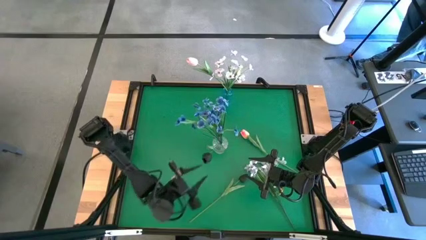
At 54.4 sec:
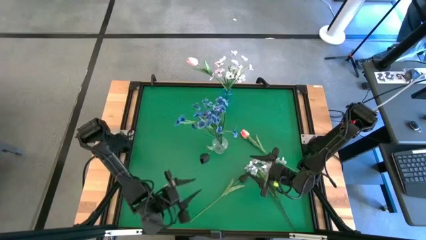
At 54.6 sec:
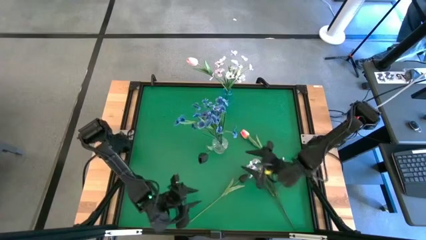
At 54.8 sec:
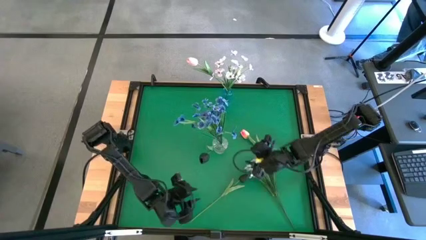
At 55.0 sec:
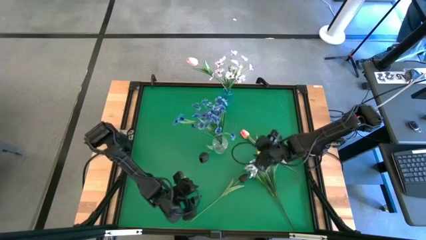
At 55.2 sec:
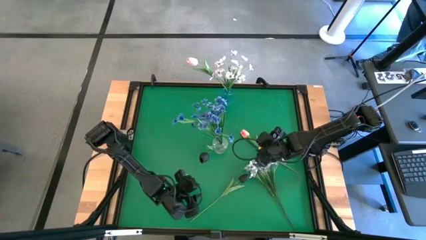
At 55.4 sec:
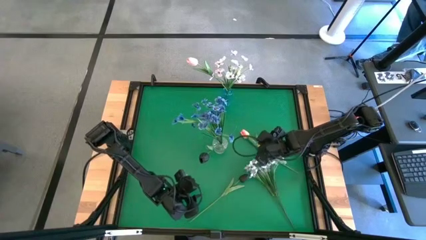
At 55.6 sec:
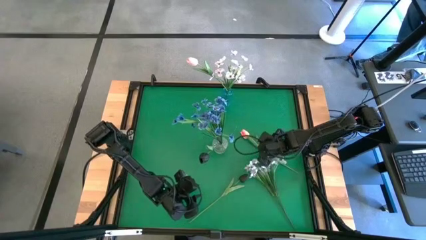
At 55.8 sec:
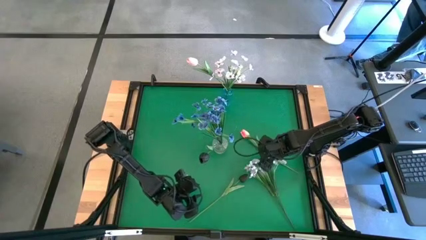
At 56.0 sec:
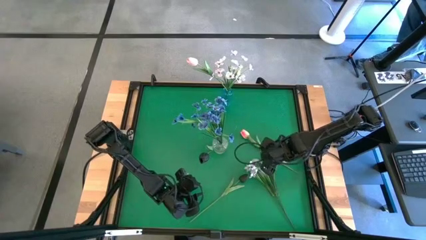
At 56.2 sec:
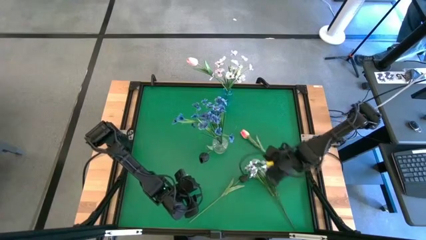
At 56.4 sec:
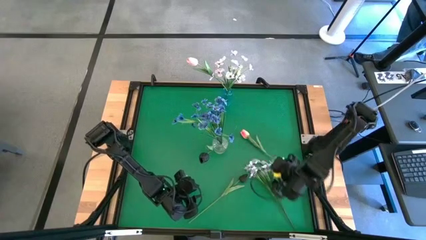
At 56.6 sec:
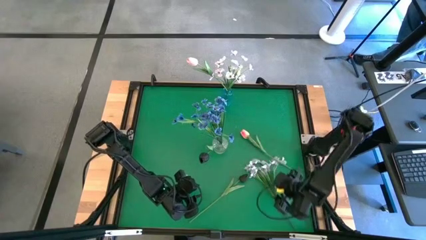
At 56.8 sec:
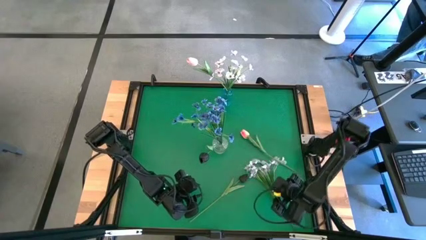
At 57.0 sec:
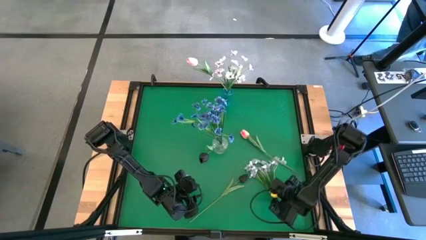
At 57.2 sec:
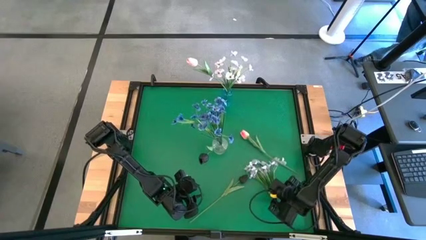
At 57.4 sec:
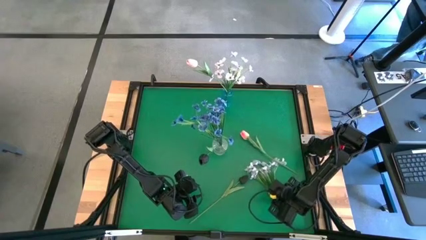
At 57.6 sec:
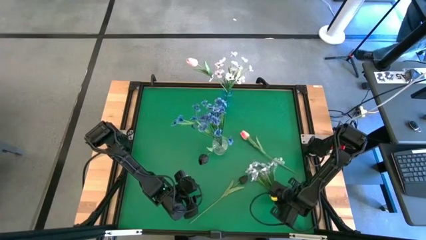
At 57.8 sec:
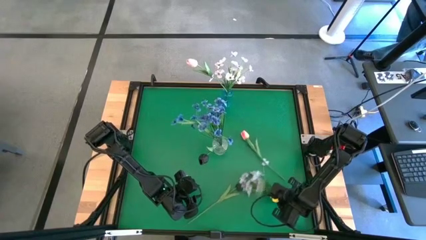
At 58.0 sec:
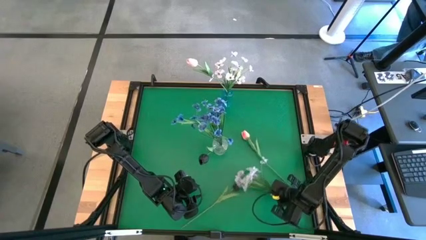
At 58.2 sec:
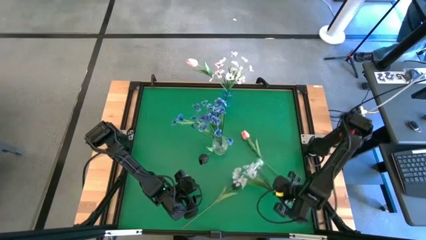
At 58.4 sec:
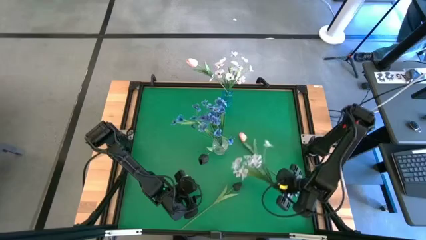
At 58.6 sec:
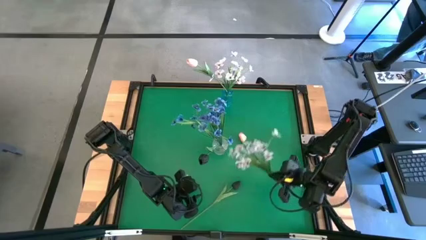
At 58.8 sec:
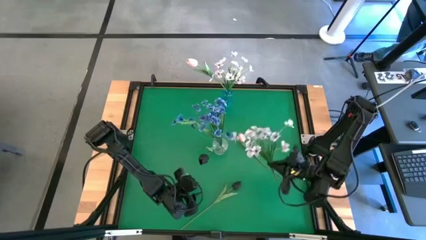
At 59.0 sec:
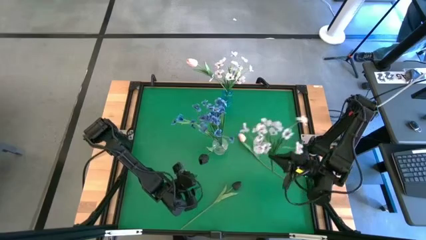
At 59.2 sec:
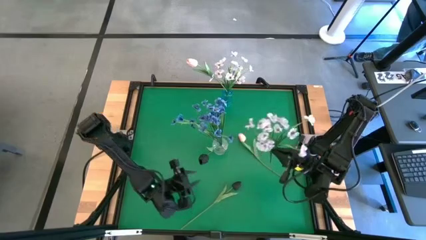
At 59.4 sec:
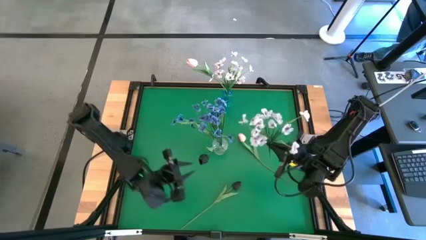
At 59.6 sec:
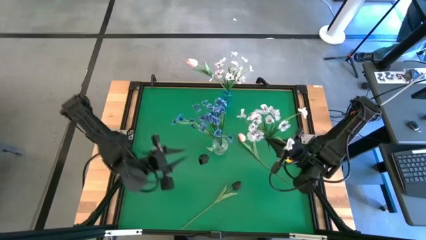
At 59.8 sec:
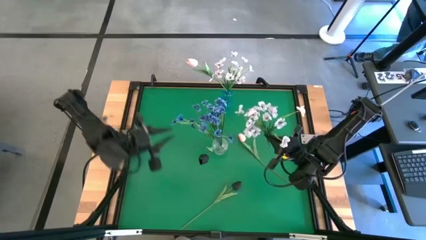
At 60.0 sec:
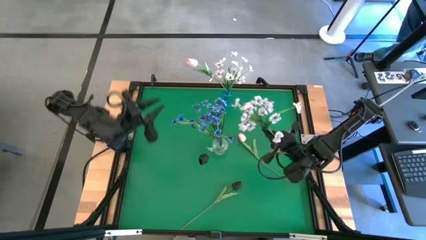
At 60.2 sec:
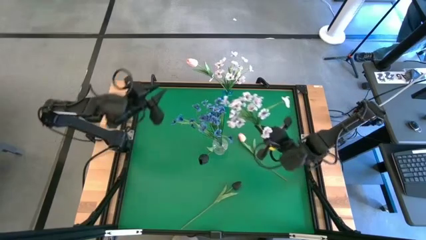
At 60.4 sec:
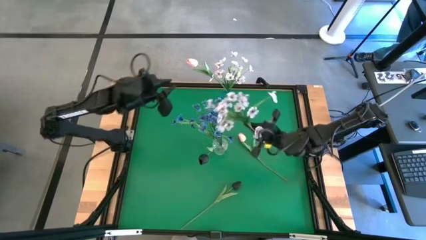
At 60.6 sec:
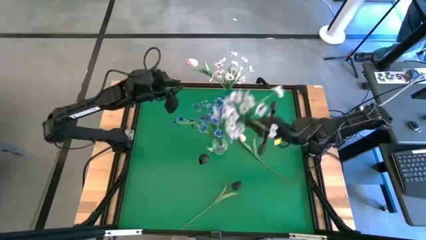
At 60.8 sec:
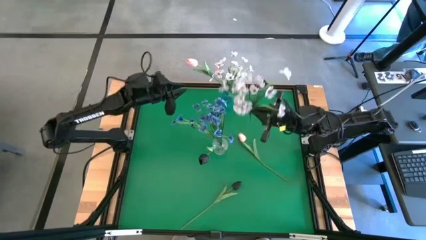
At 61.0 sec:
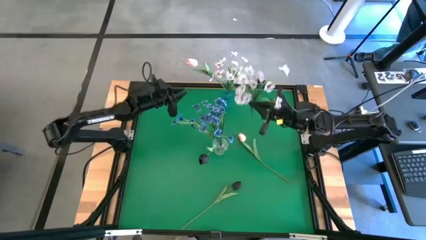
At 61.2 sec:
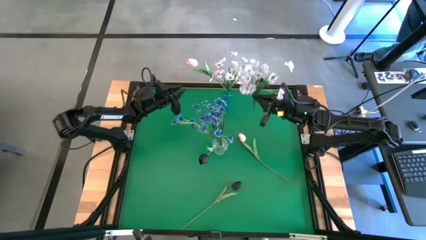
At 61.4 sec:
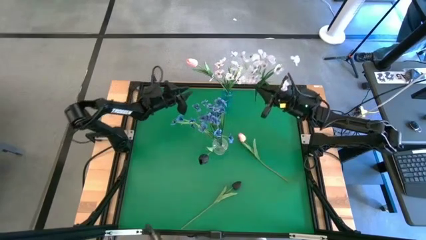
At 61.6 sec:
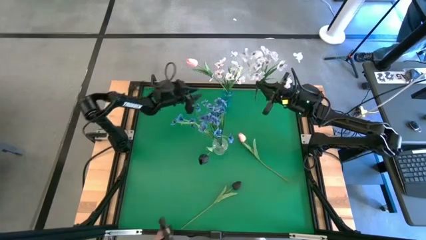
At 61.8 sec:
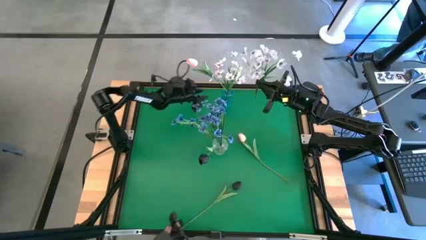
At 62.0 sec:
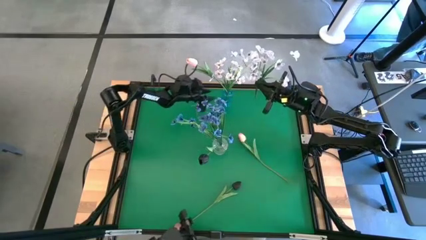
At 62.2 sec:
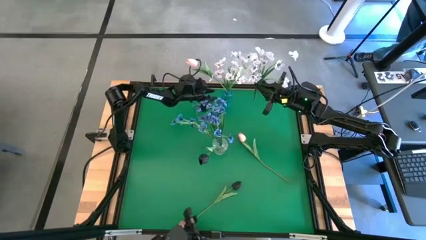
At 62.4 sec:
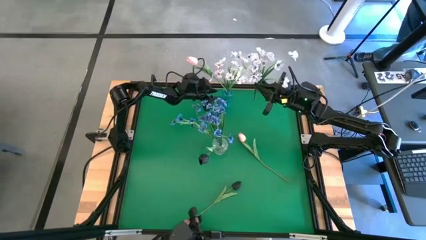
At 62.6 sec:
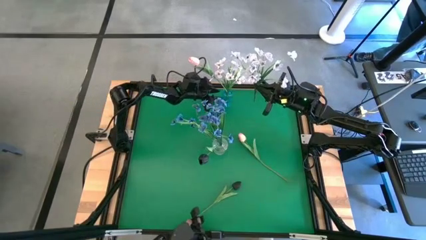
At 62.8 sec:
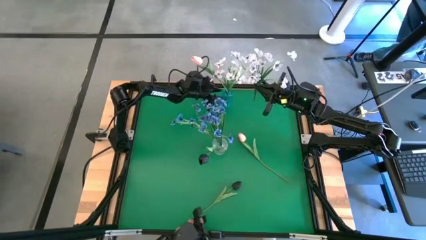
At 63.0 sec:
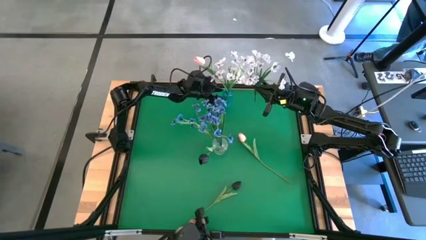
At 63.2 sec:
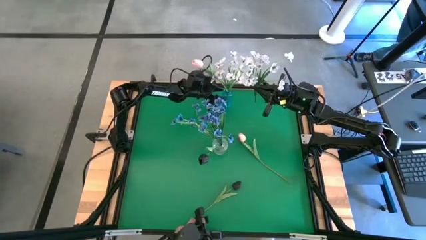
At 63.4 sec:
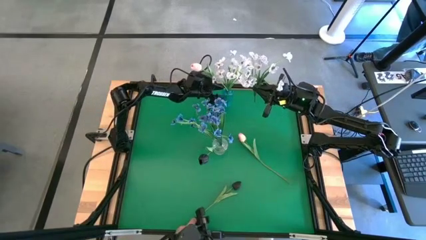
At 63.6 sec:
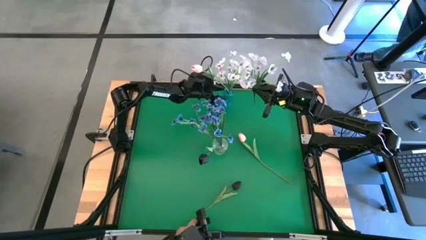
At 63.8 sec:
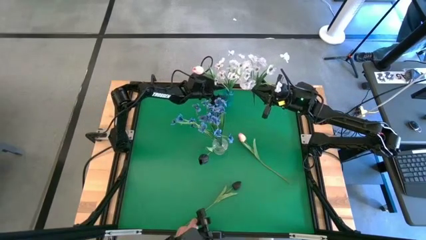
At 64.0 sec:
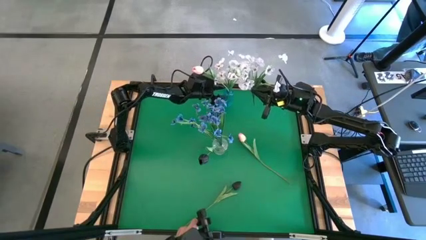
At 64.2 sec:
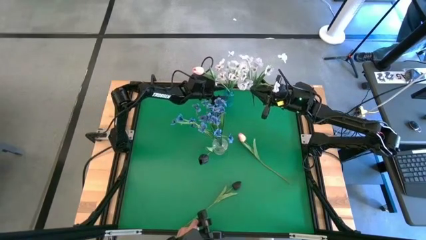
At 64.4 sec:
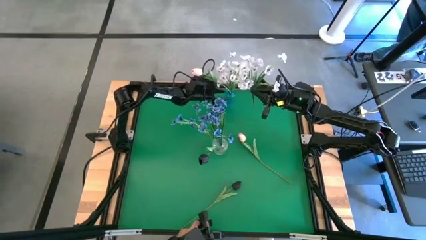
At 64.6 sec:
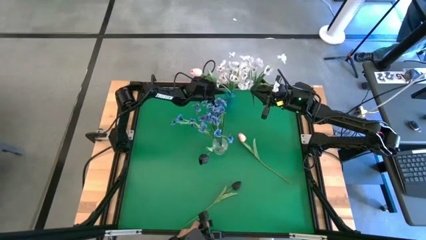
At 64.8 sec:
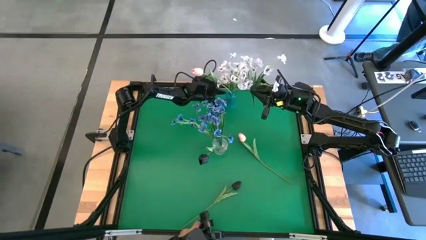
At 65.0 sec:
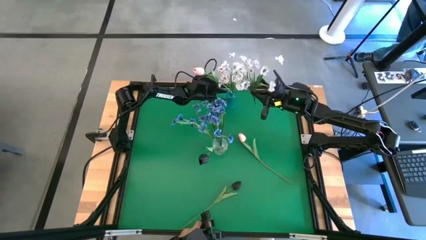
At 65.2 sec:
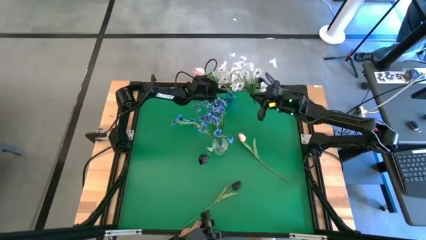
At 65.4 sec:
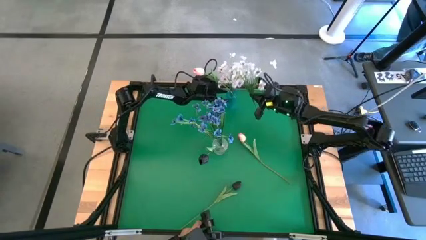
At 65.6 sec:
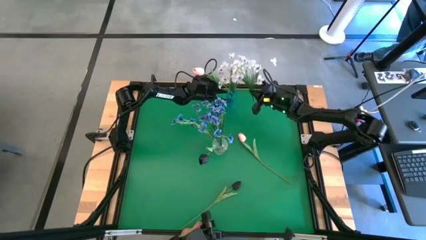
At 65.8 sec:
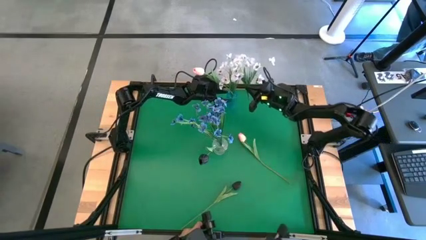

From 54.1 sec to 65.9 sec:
Task: Sort flowers into vase by color
Put the white flowers into the blue transparent vase
